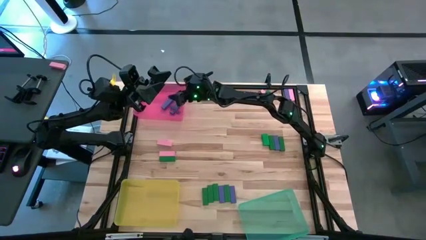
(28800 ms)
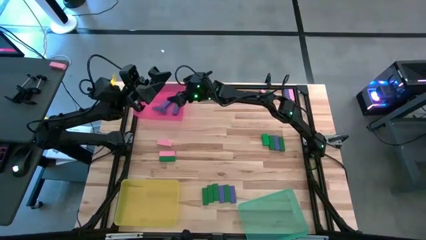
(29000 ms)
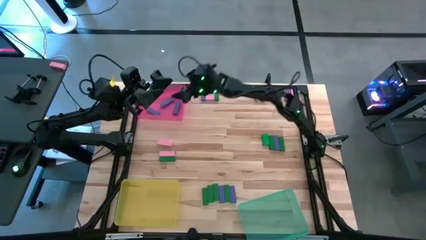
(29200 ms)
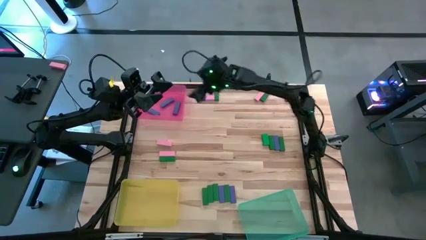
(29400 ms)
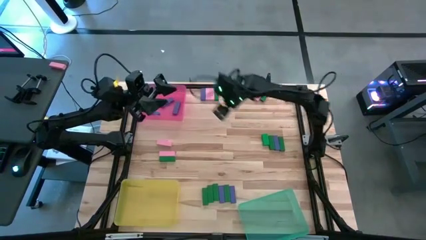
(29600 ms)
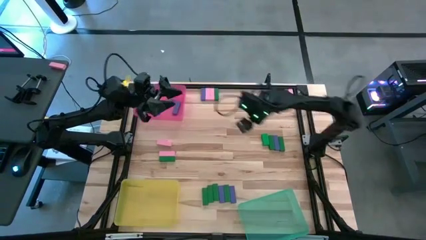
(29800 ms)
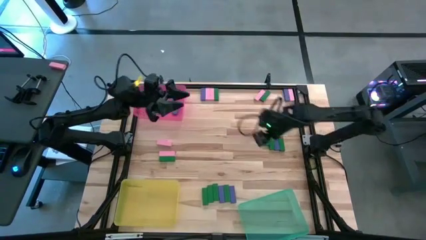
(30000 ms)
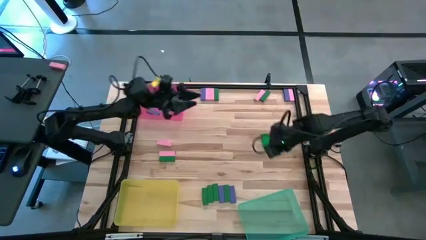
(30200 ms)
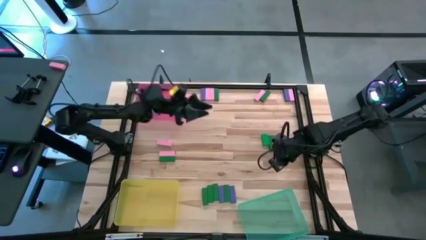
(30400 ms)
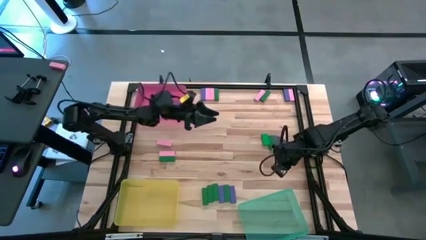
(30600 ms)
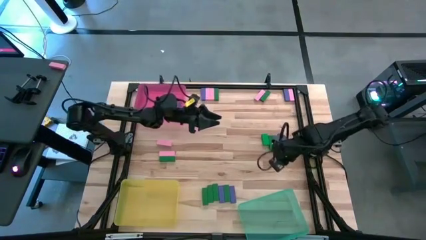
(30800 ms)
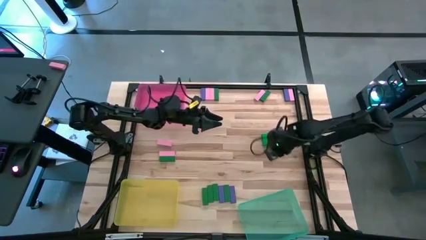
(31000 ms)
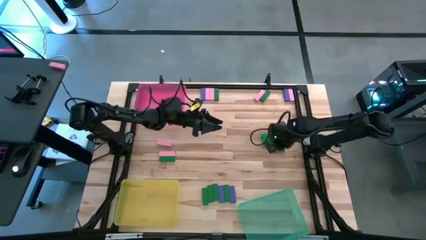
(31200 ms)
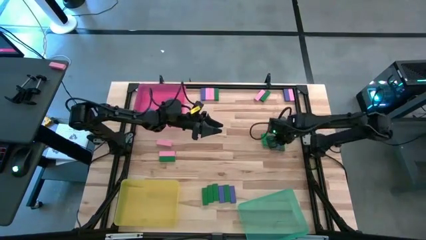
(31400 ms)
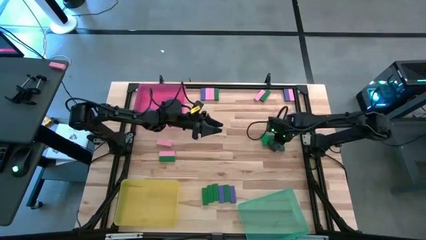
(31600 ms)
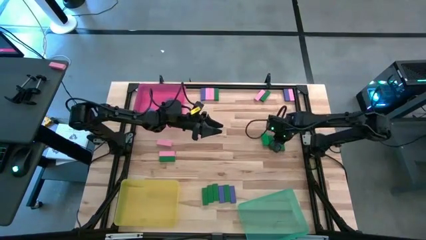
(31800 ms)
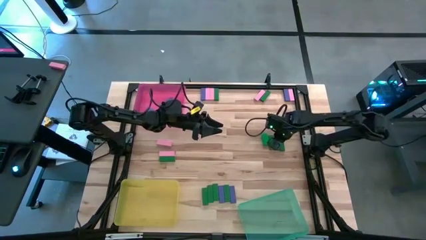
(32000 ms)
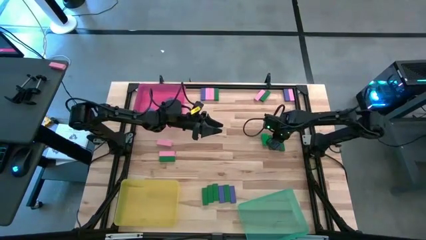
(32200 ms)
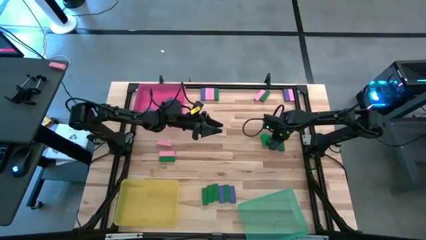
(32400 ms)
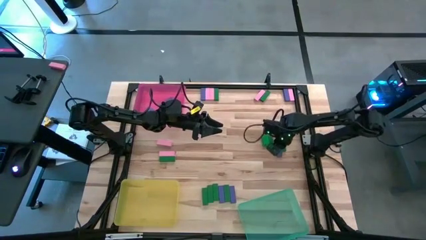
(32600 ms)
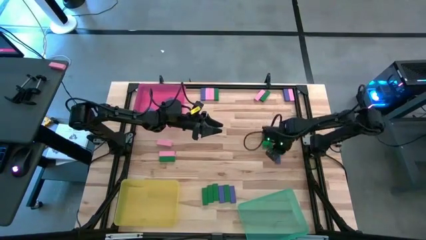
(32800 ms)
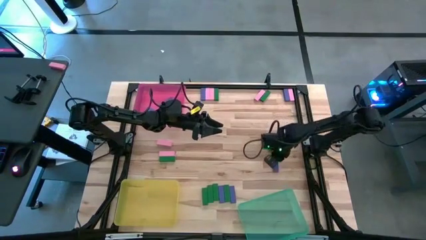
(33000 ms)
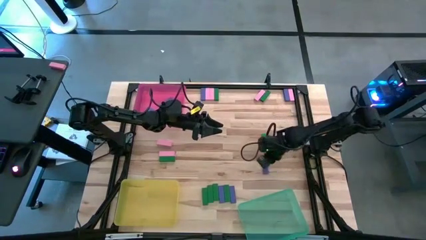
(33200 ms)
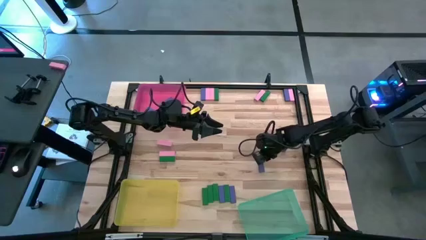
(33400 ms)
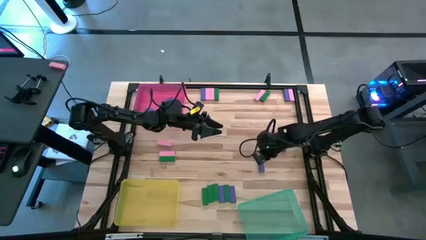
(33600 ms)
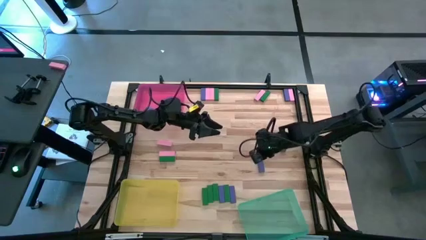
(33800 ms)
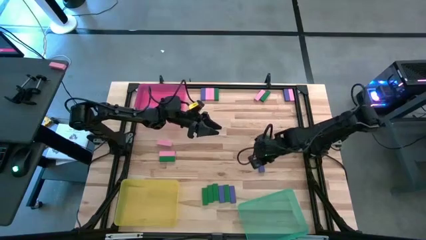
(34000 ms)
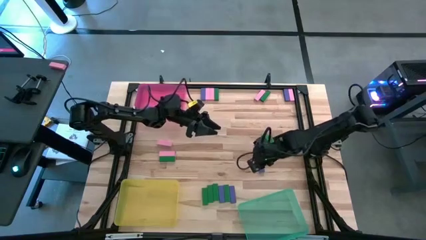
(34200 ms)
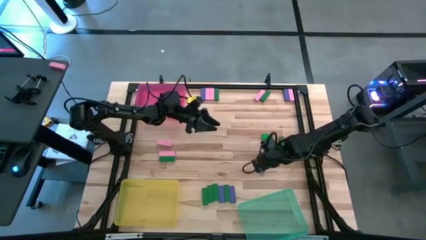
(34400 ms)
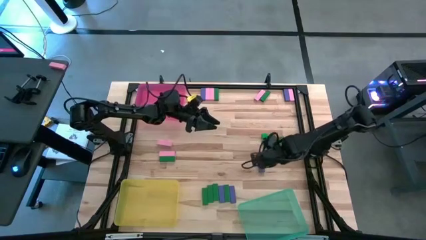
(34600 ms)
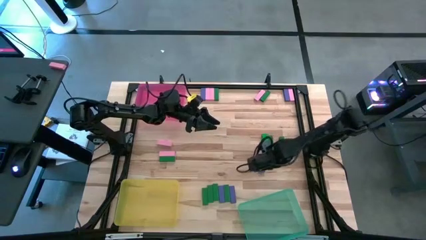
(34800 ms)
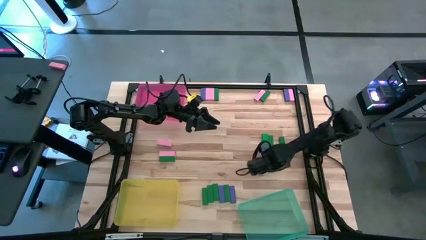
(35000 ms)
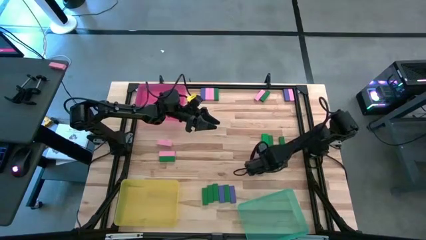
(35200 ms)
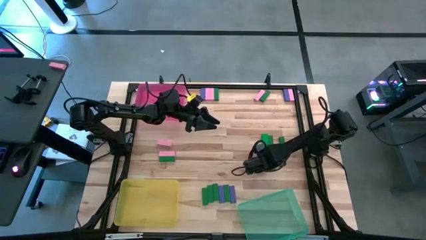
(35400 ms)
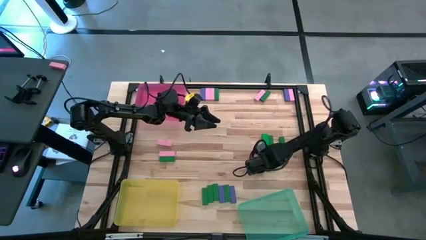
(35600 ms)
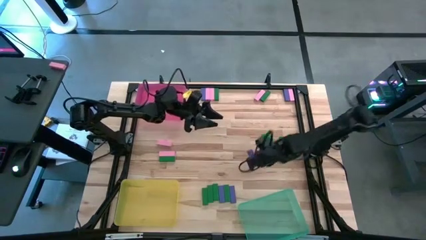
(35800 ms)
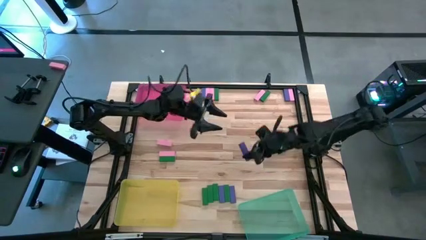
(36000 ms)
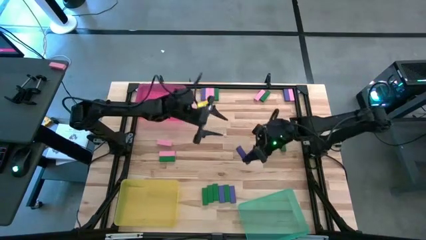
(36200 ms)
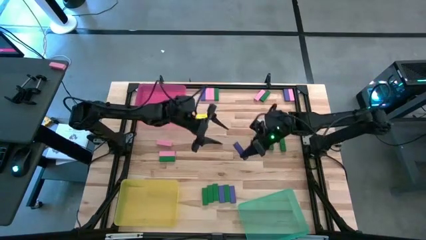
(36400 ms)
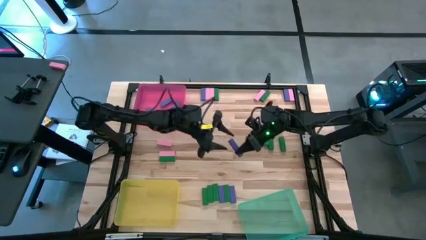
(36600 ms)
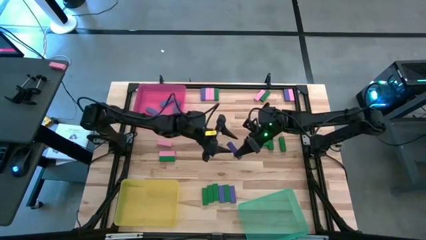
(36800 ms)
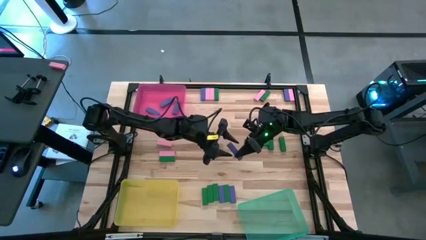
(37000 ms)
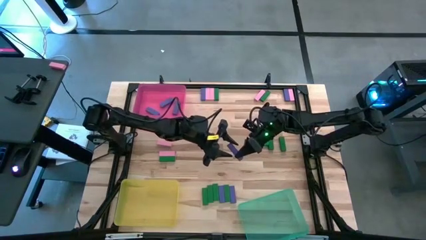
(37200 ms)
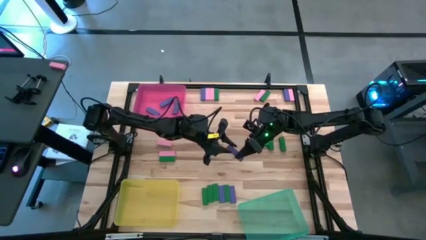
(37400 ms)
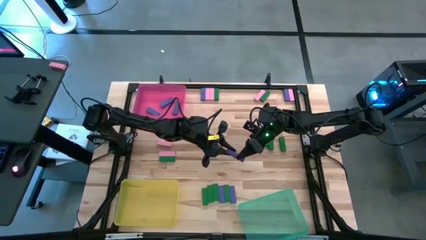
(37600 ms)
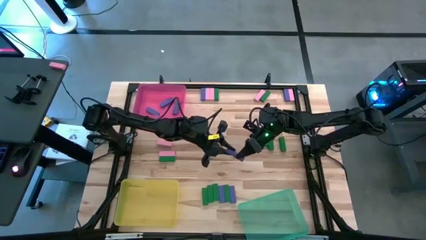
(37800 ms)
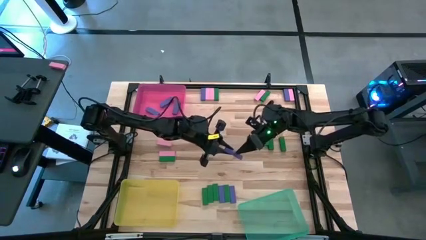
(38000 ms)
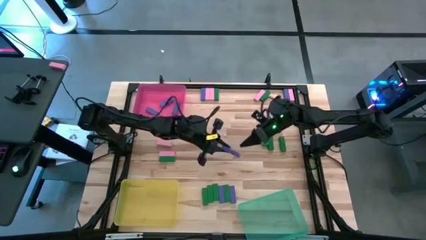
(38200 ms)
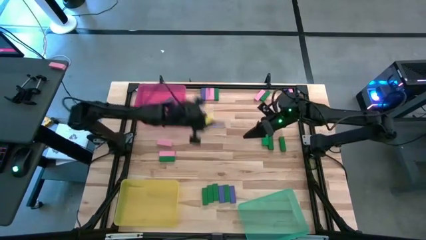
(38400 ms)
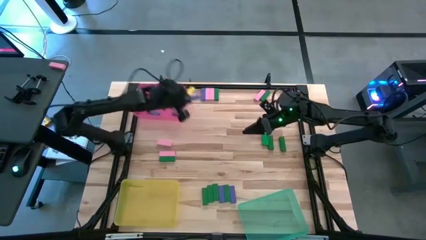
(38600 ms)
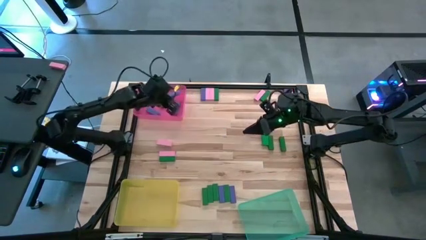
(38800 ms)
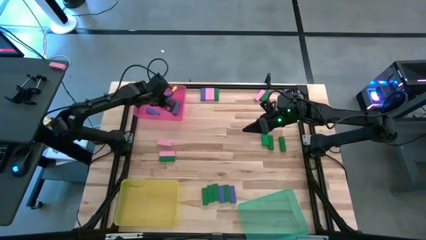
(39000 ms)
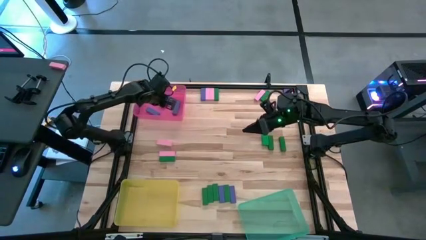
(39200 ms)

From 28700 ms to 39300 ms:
Task: Sort blocks
Put the violet block into the pink bin

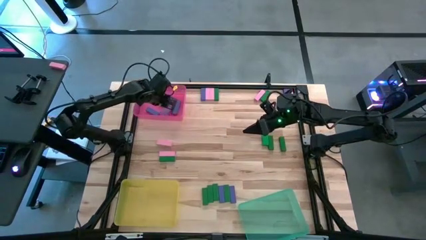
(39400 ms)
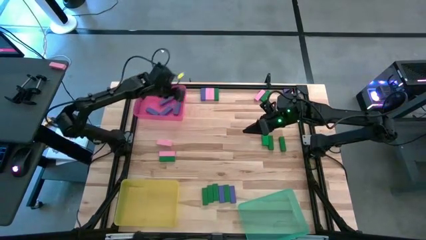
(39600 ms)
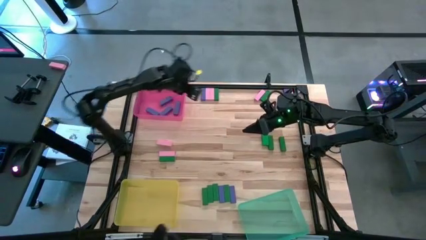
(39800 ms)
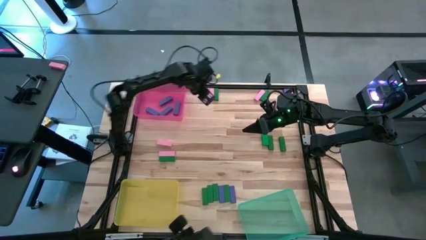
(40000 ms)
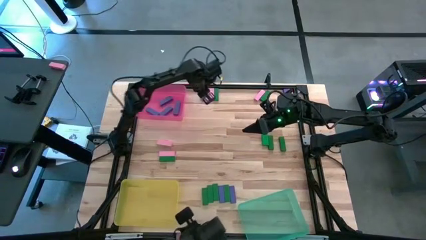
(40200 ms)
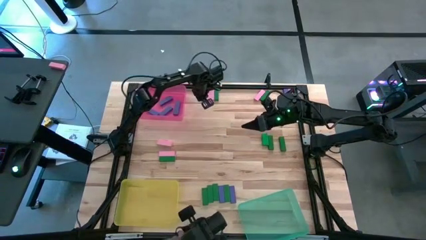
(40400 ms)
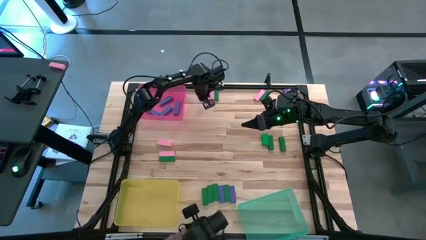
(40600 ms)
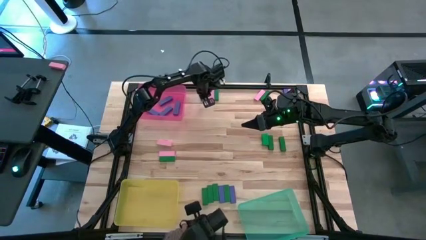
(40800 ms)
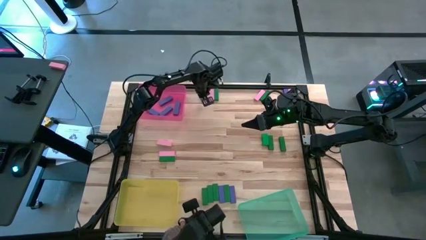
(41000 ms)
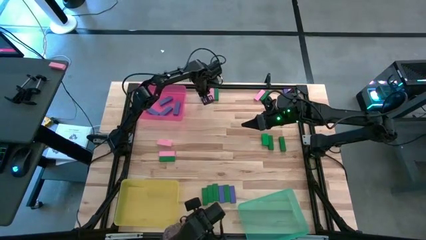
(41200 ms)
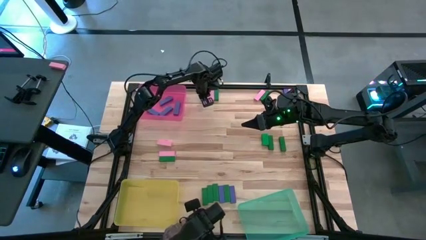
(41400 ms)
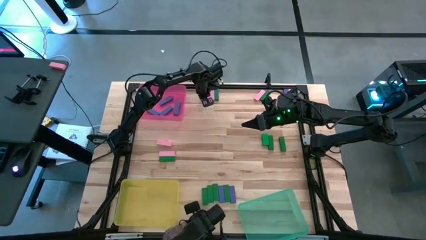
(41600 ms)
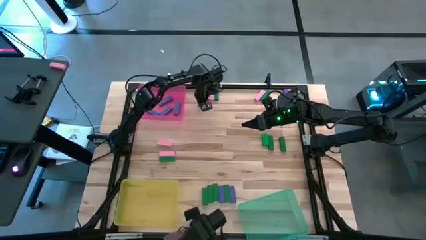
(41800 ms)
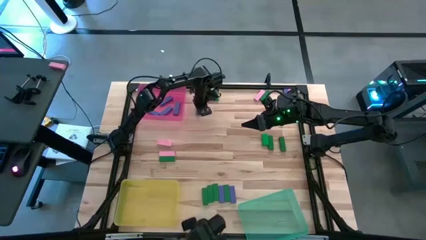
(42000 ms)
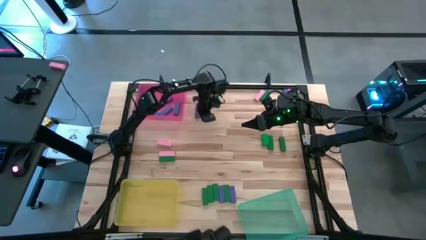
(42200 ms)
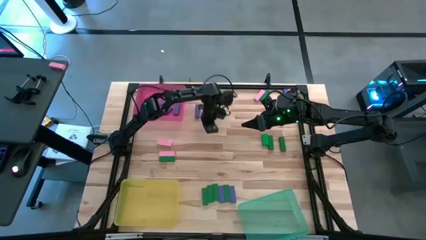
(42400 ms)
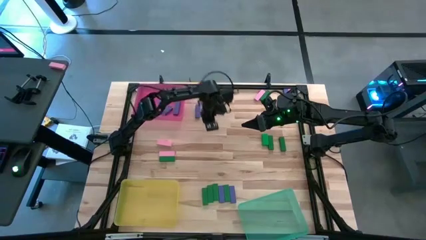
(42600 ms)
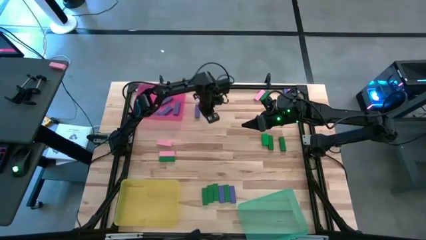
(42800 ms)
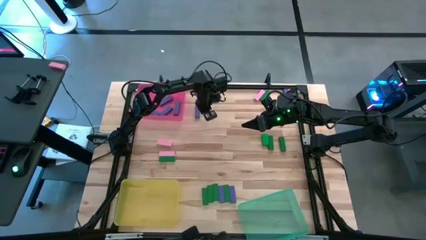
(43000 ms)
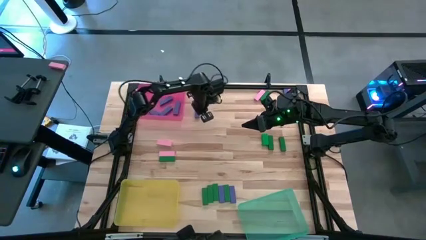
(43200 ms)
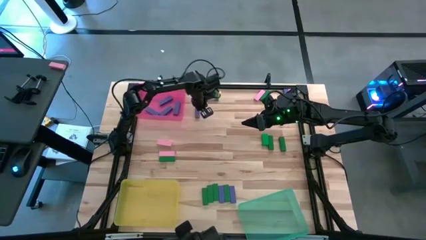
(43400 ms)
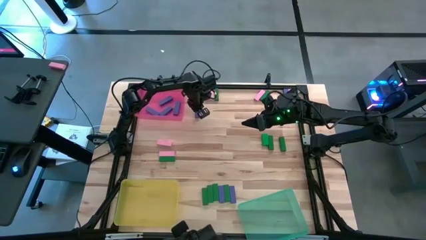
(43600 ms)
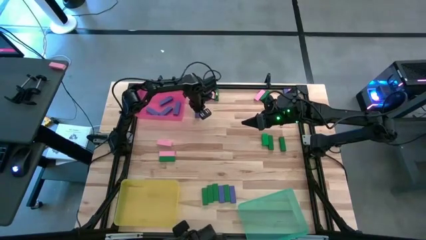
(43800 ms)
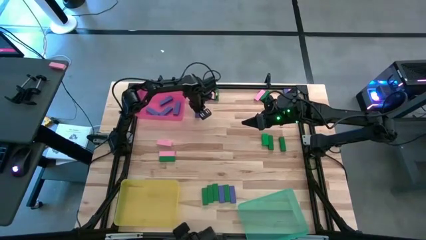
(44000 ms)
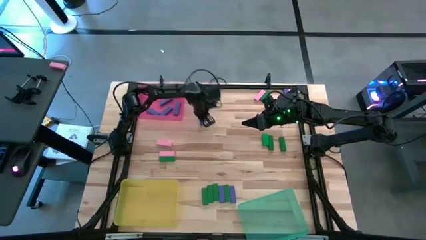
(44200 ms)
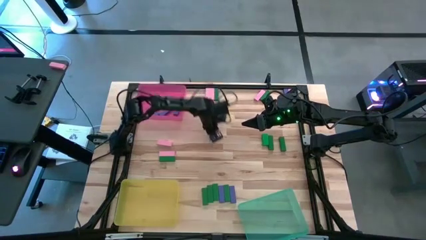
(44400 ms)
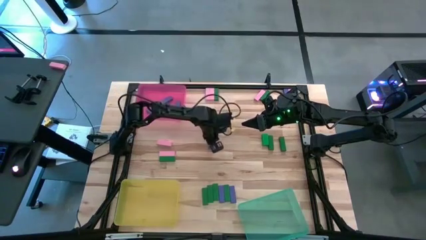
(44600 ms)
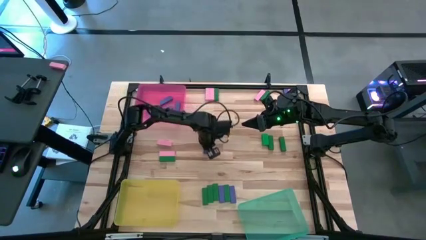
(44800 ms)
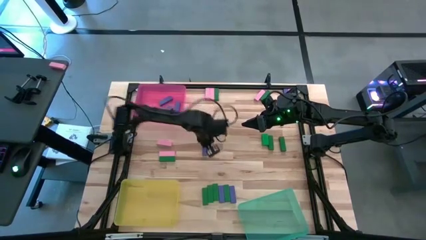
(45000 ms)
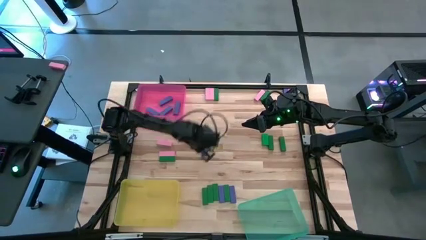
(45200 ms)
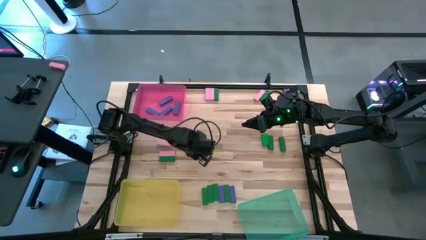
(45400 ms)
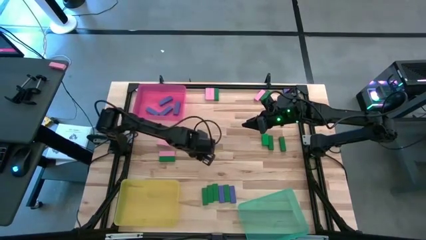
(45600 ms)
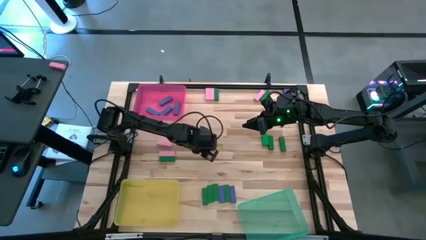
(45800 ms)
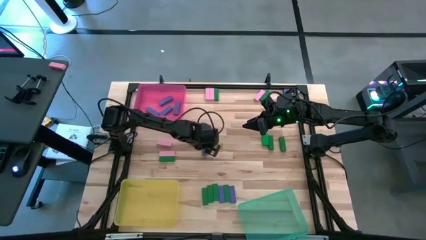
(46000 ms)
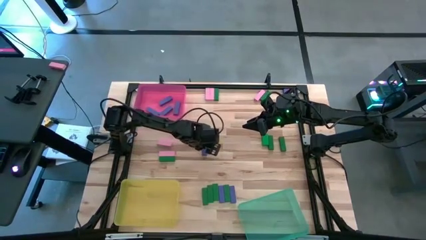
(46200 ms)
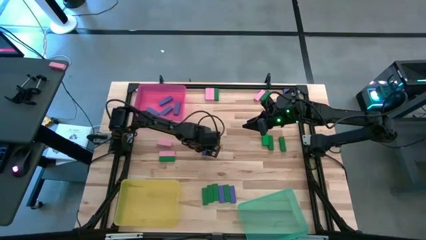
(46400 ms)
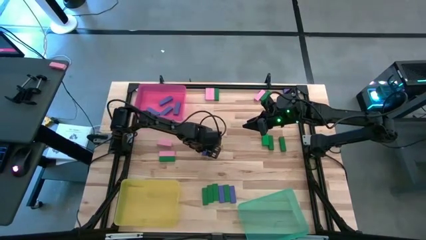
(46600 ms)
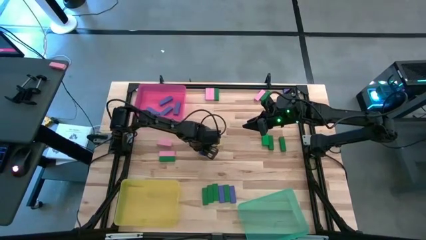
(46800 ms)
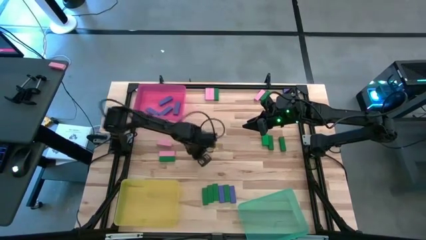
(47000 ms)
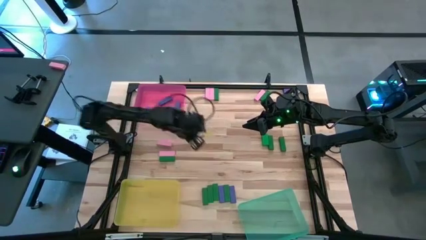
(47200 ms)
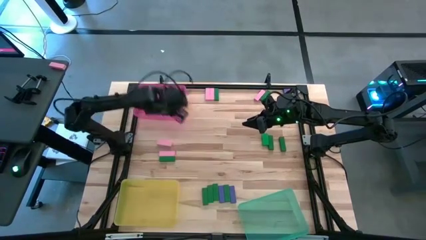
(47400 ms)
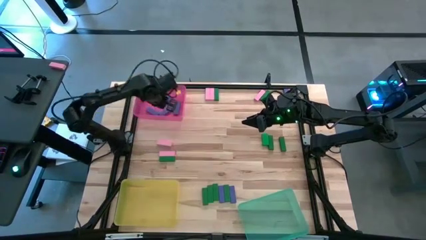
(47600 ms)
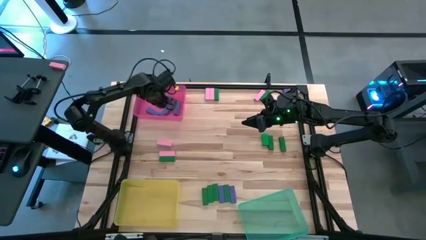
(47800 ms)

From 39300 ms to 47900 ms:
Put the violet block into the pink bin
